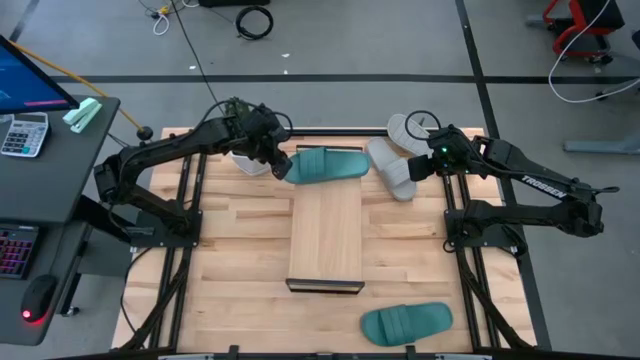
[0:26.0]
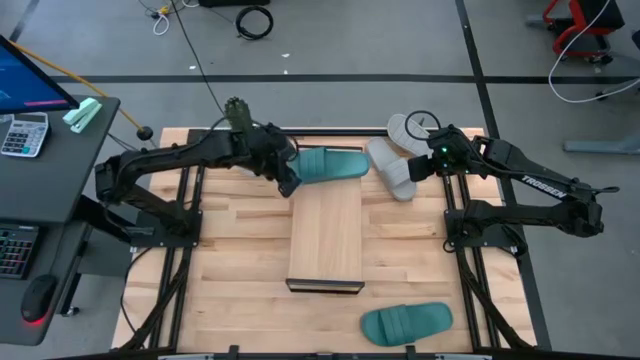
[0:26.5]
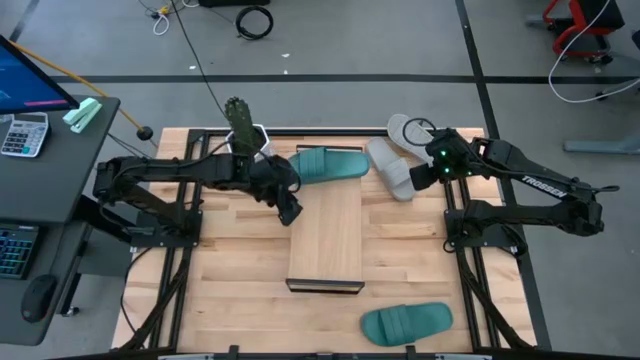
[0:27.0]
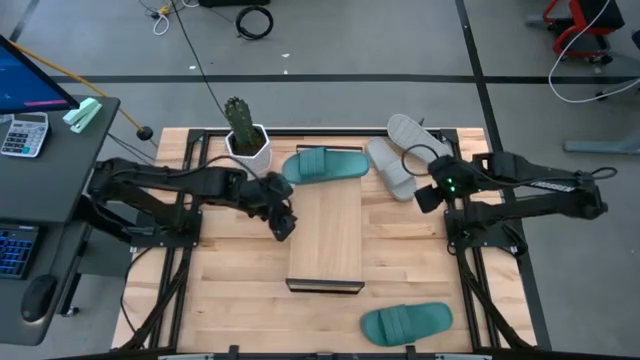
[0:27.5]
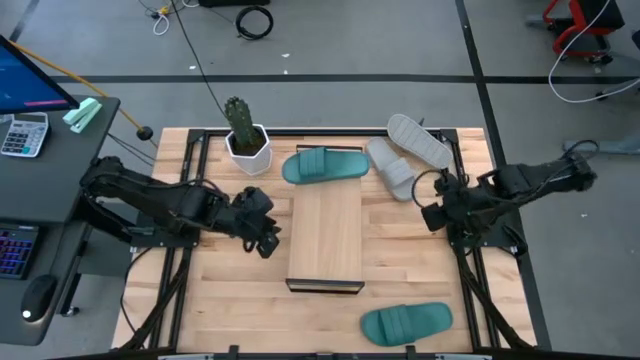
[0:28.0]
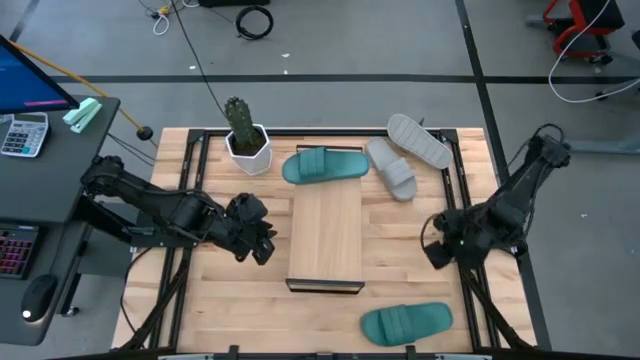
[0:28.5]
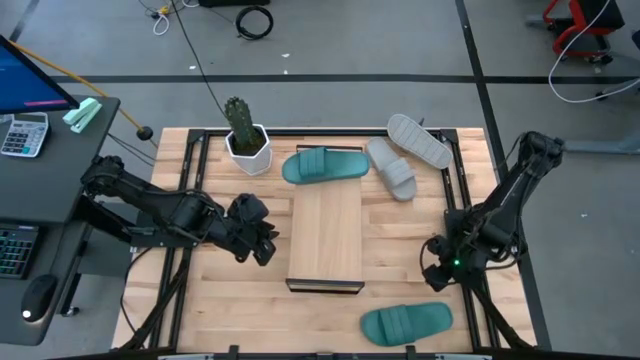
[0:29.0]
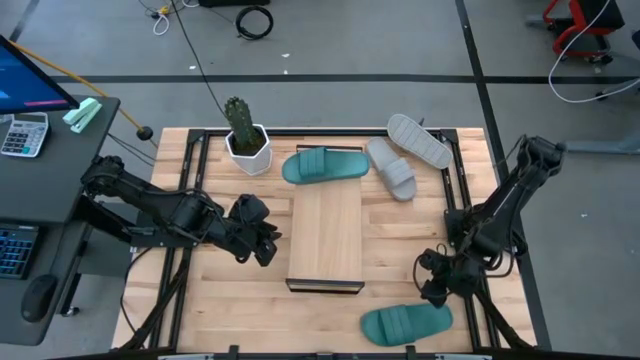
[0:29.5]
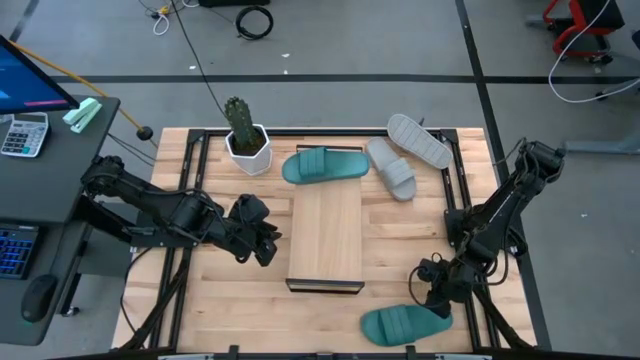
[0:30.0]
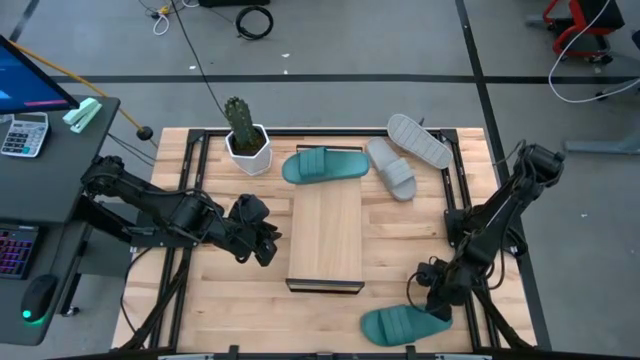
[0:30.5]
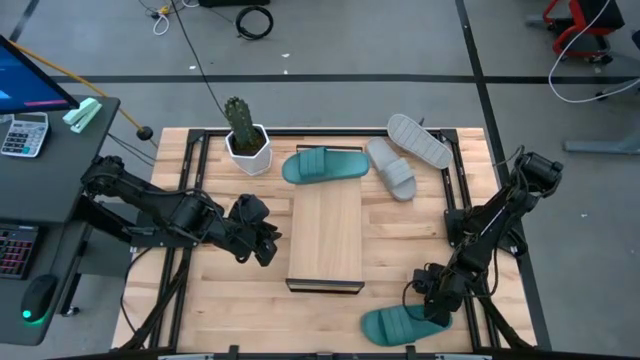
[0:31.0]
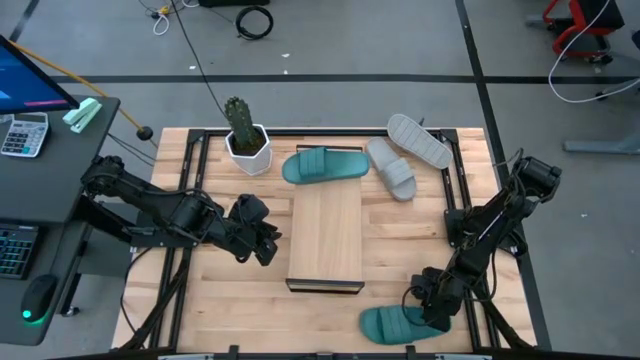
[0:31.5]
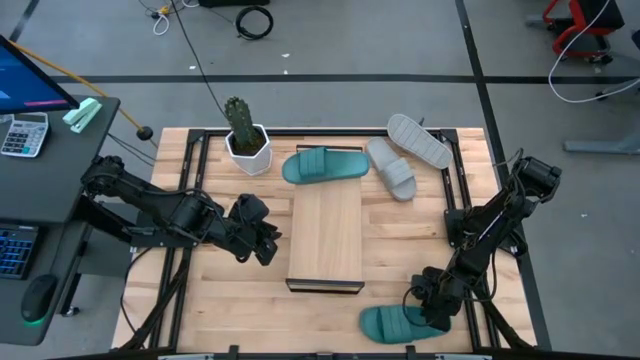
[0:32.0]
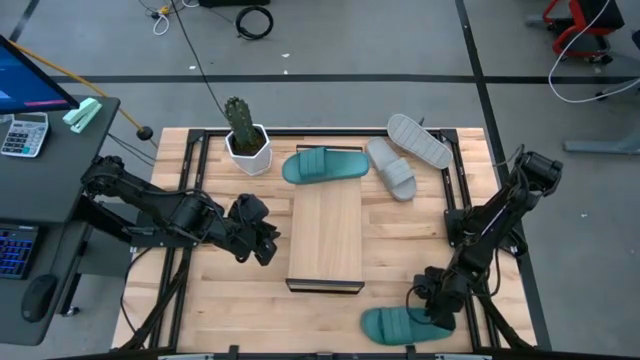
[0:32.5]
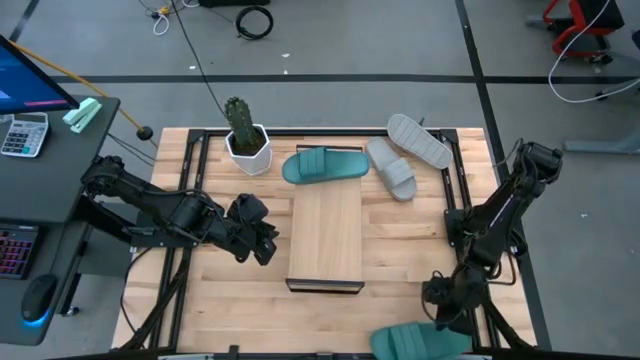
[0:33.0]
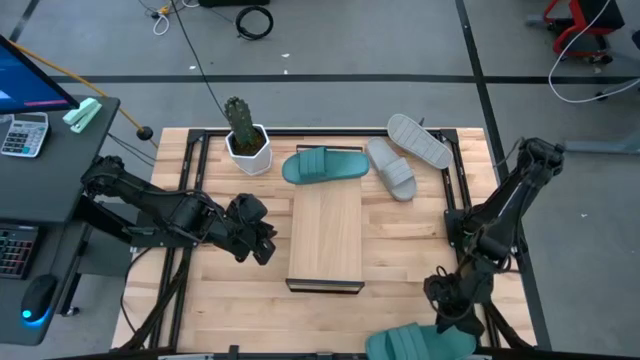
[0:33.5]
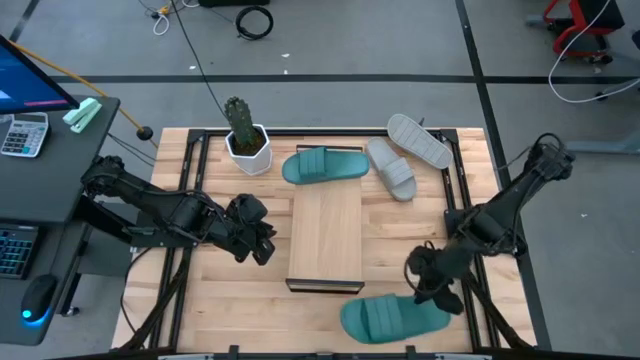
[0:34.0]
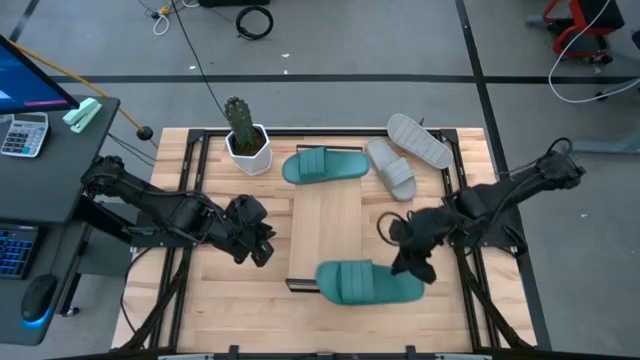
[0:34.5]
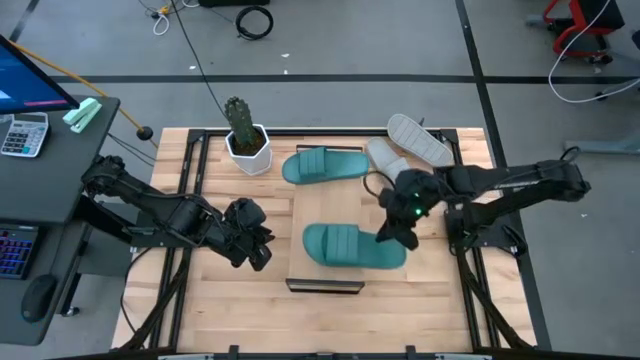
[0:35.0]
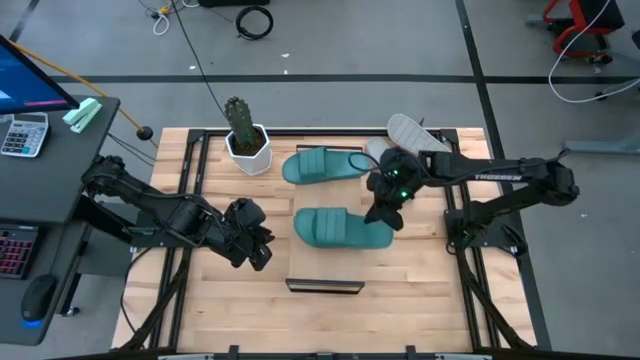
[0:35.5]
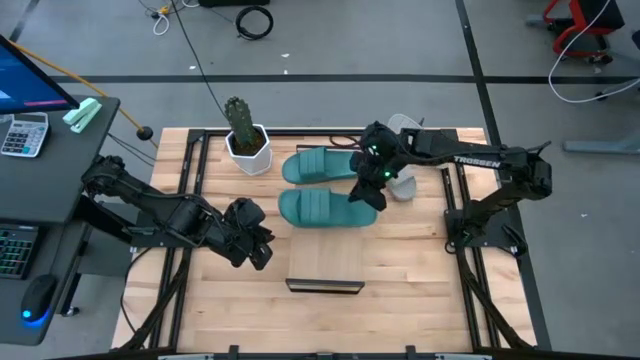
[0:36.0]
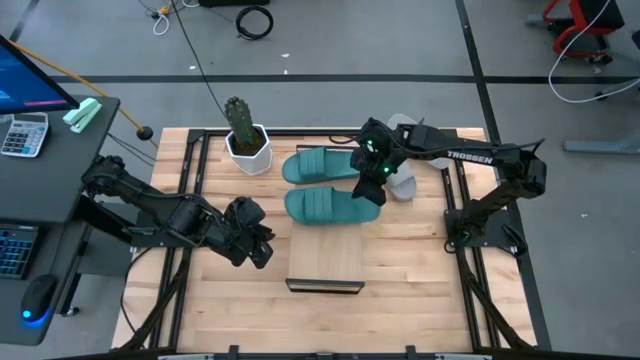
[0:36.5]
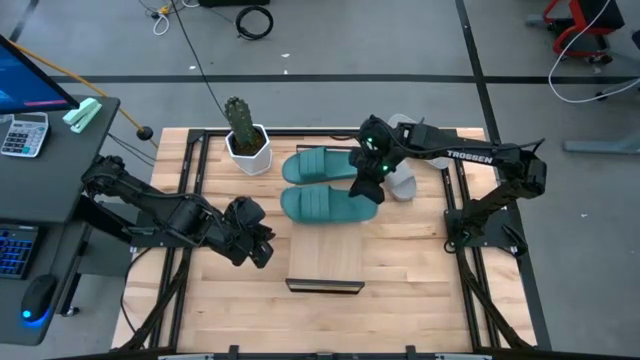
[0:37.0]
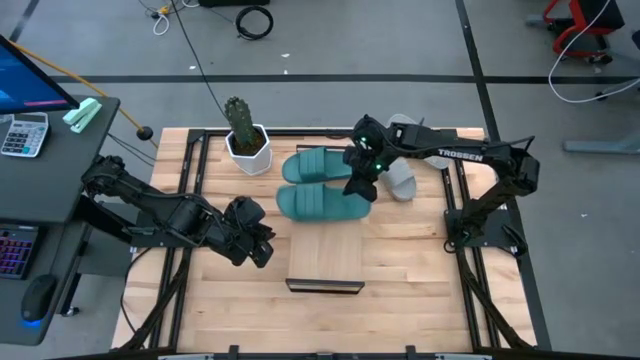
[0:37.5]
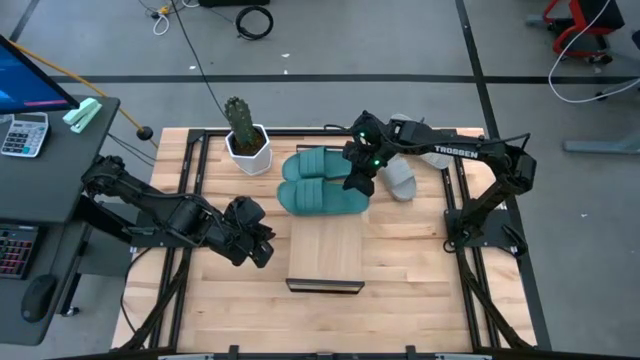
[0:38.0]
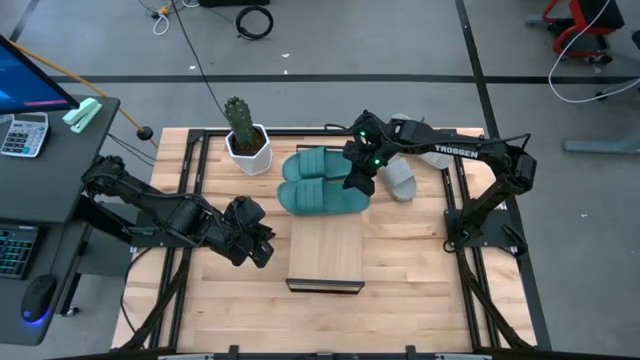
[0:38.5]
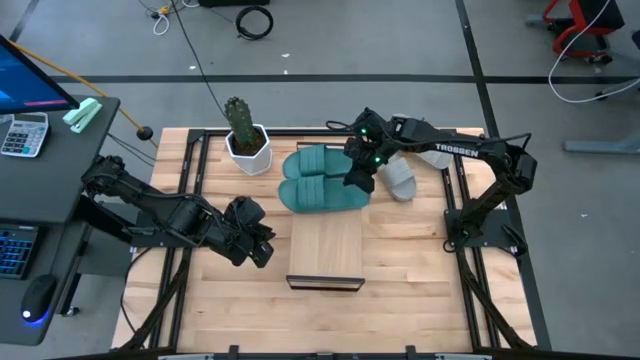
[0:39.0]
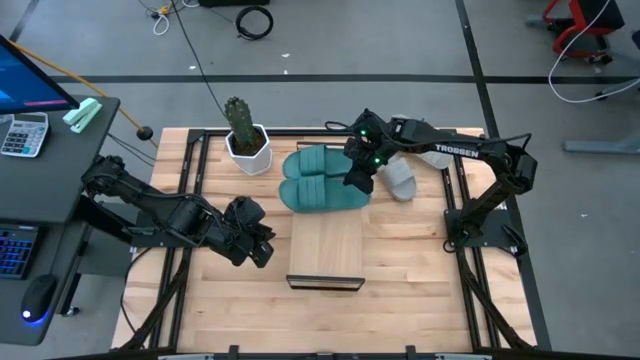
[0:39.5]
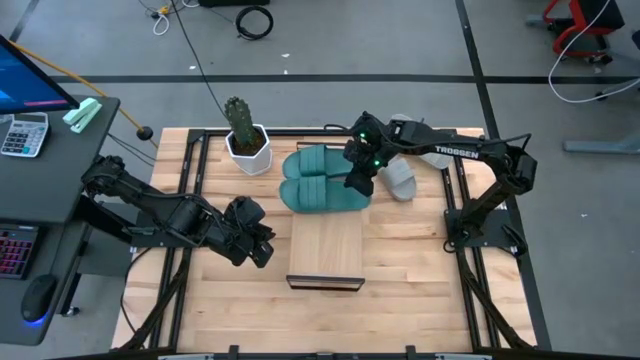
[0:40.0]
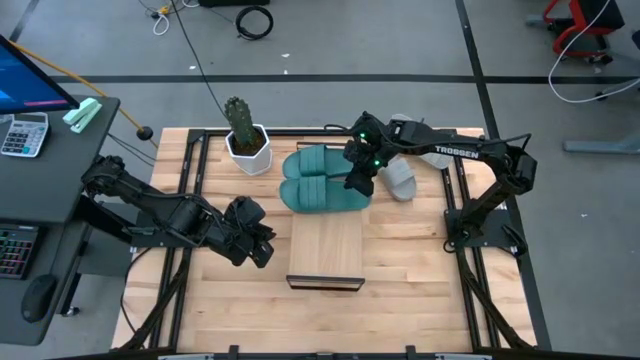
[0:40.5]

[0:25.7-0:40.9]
Task: Pick and place slides into the shelf
Put the green slide on the shelf

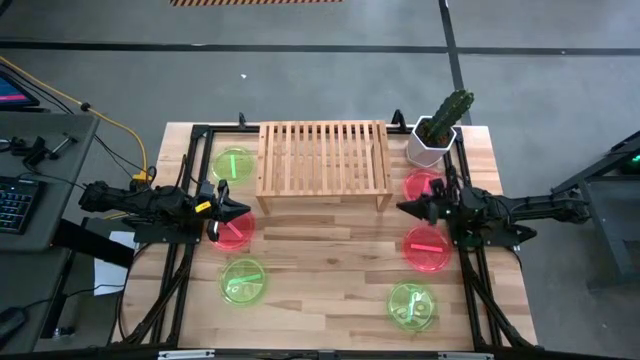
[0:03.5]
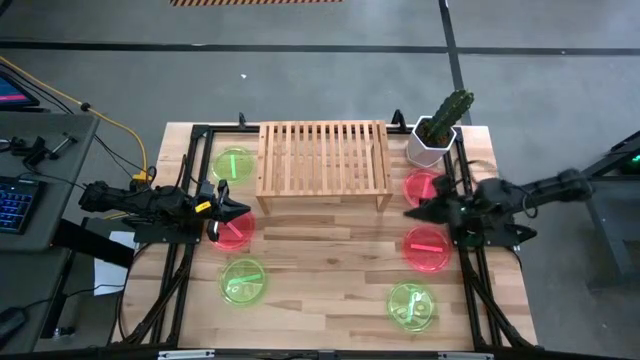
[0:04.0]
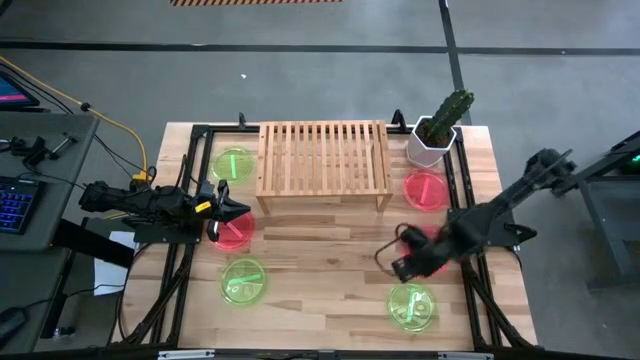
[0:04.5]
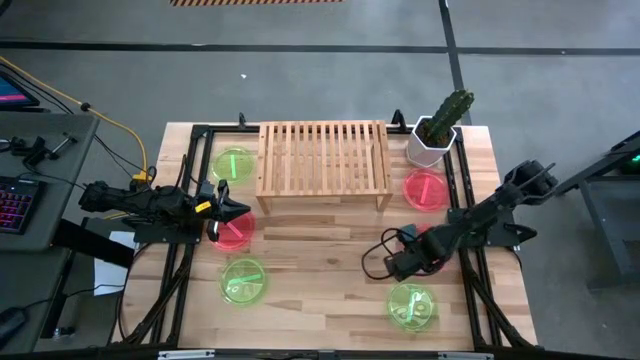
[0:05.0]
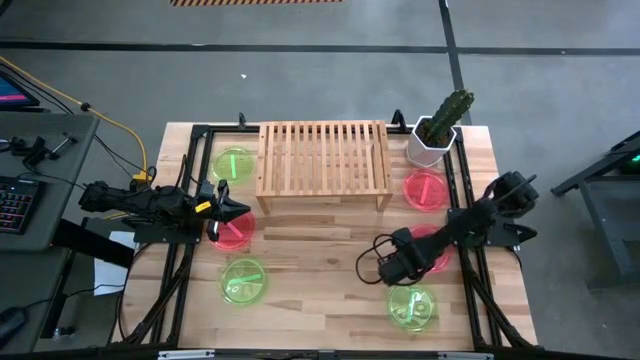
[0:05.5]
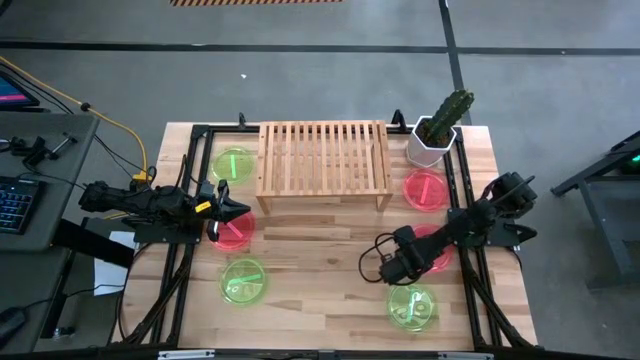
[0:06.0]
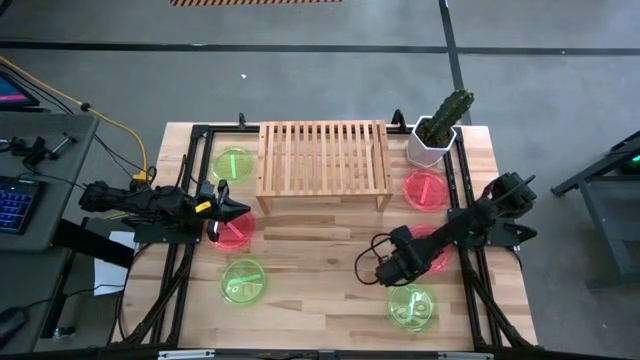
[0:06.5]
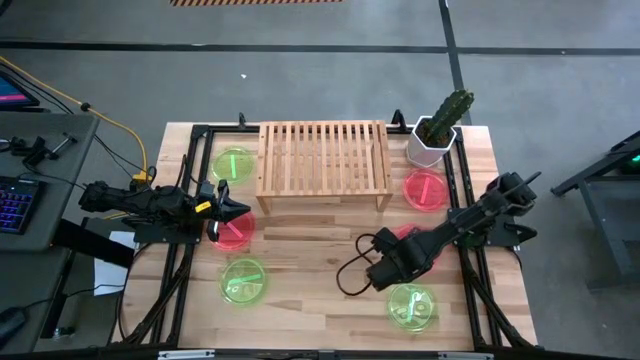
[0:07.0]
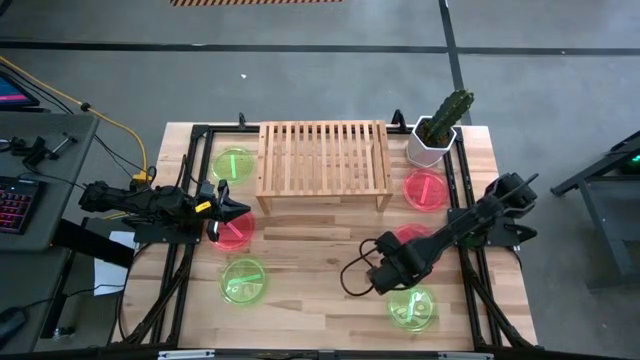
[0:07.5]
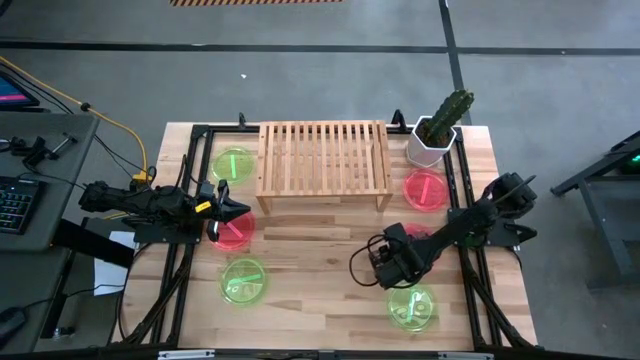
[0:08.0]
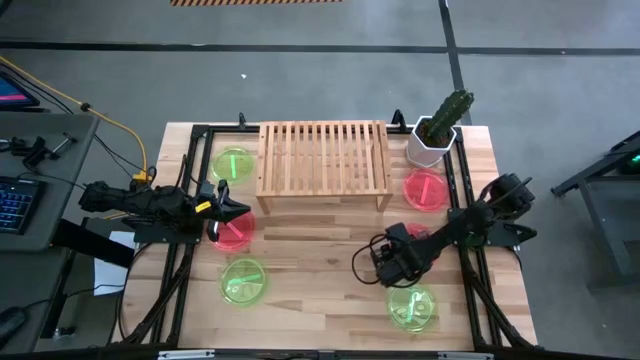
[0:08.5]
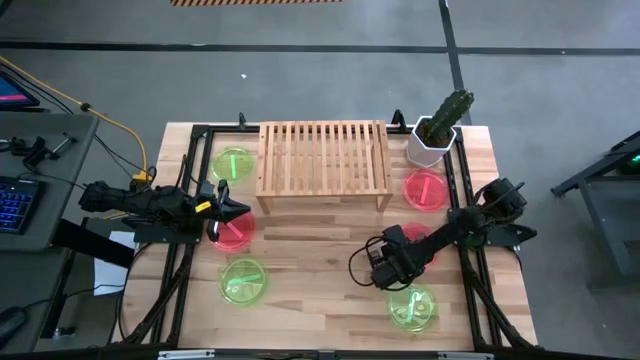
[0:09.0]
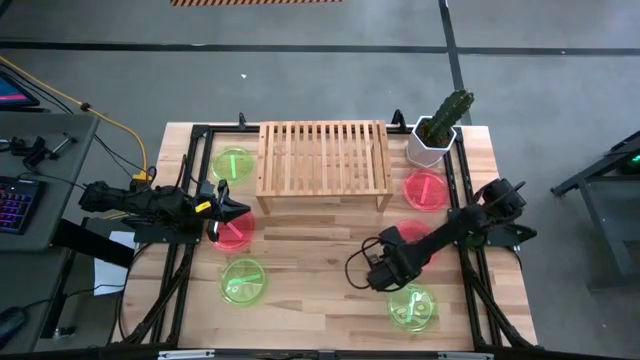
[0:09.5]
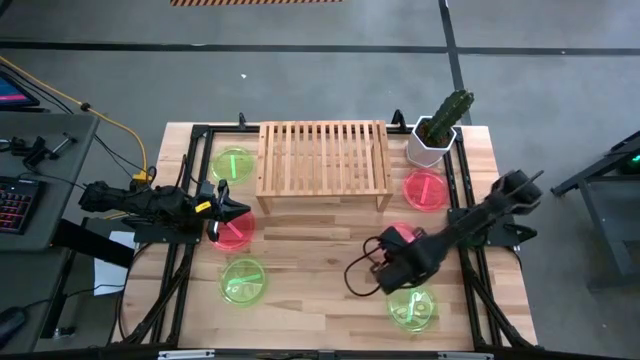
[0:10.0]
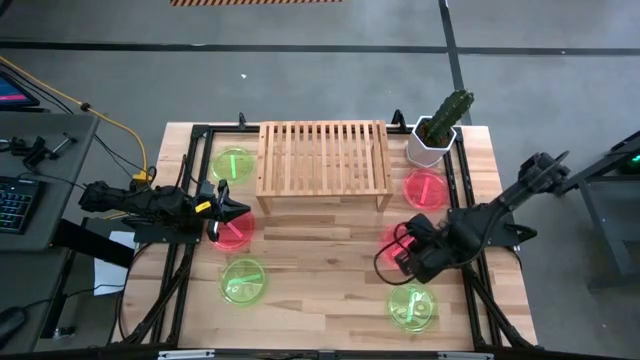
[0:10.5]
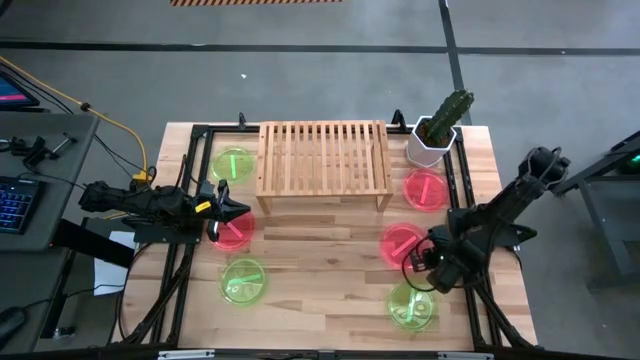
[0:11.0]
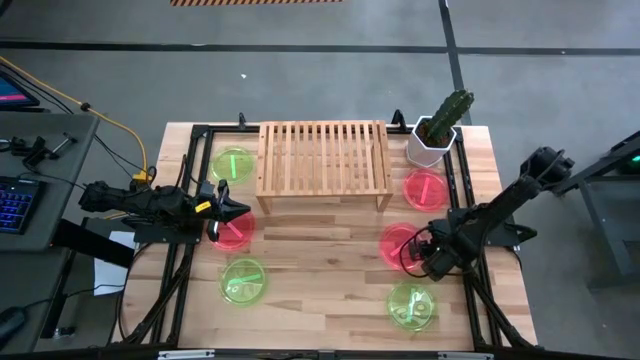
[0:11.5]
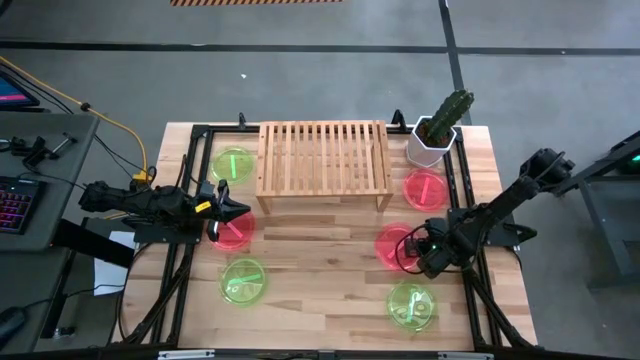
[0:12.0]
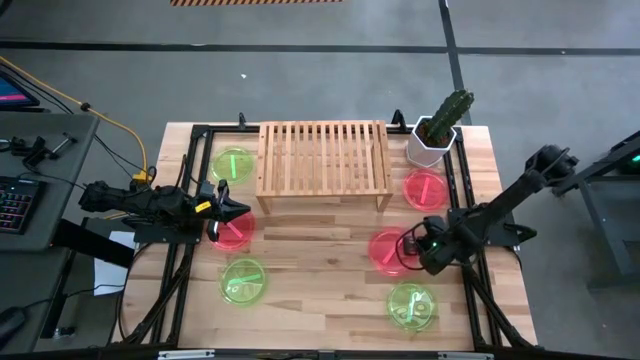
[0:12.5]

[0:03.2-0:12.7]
Task: Place and stack plates onto a shelf
Put the bottom right pink transparent plate on the shelf
